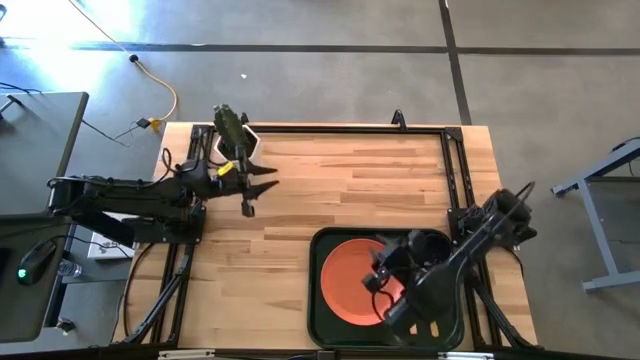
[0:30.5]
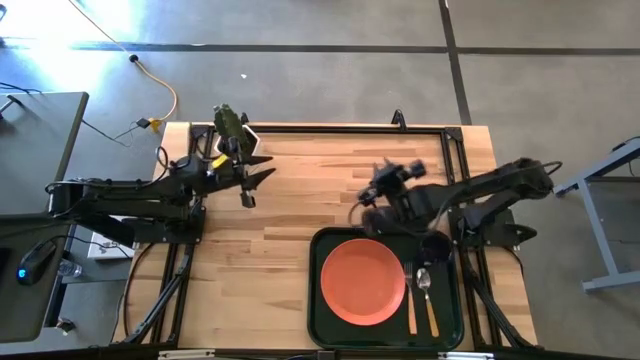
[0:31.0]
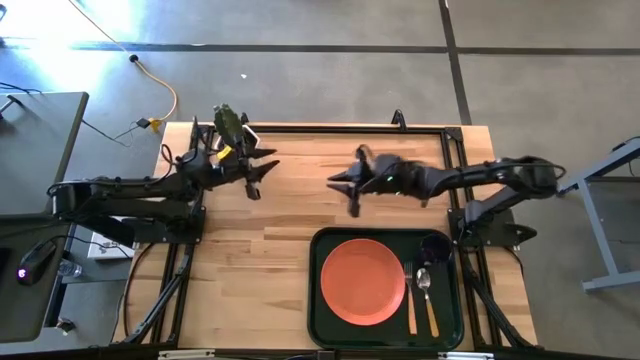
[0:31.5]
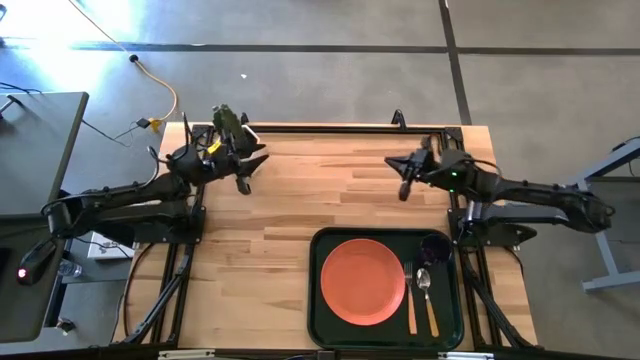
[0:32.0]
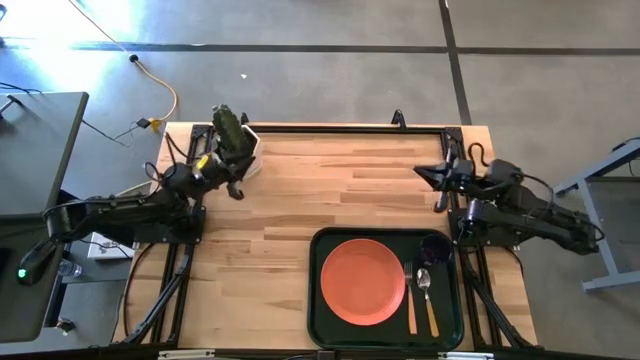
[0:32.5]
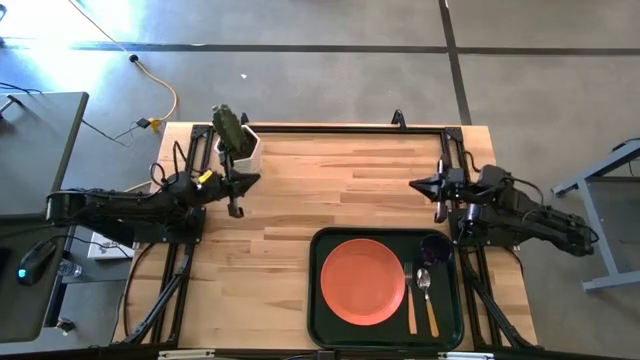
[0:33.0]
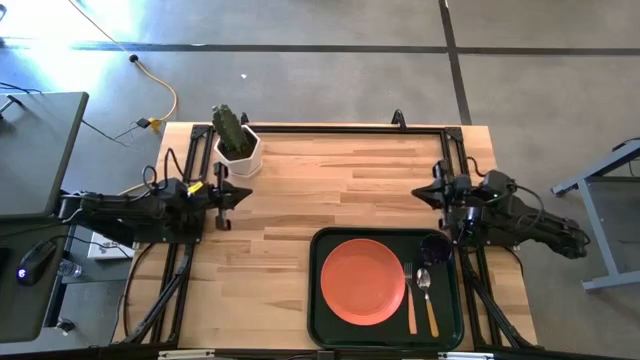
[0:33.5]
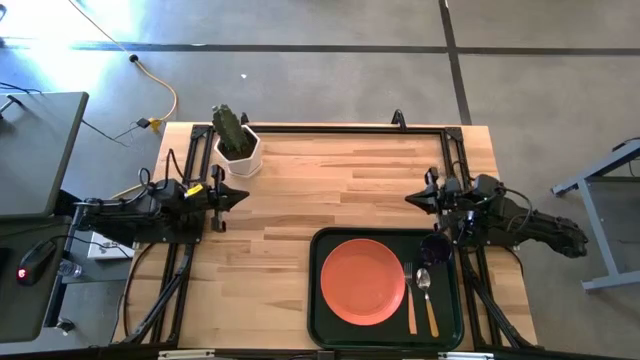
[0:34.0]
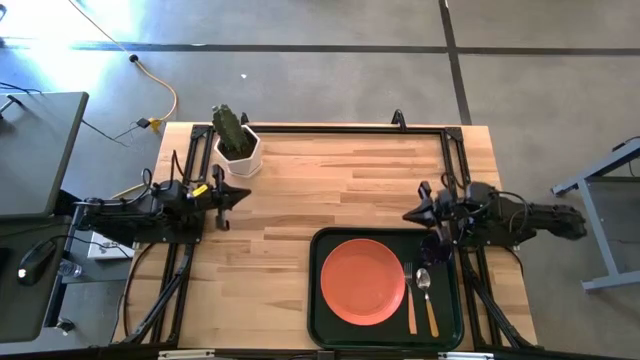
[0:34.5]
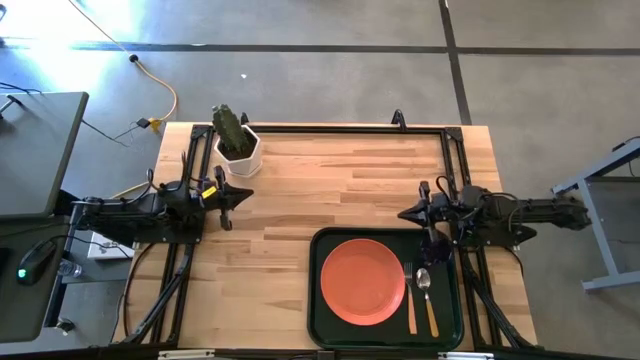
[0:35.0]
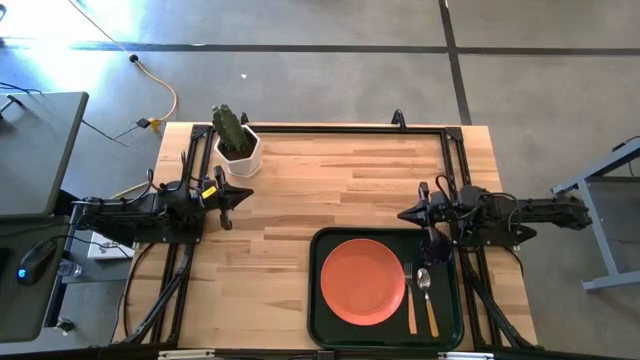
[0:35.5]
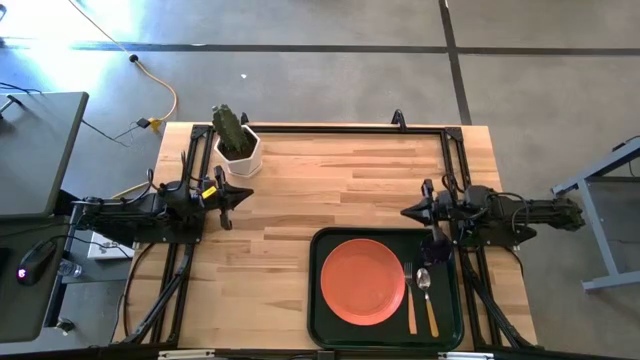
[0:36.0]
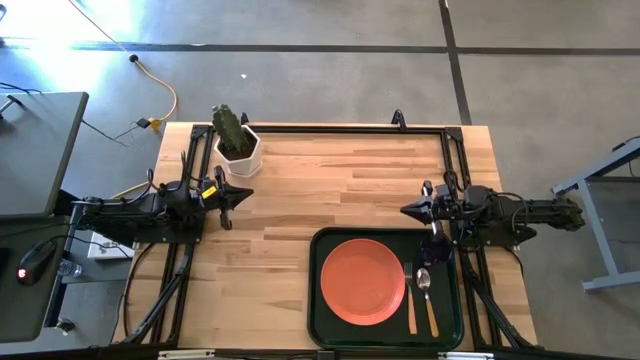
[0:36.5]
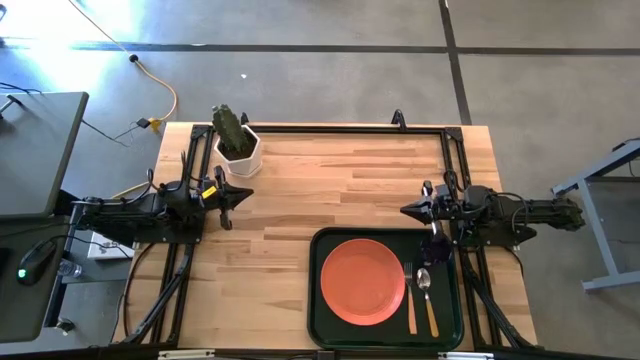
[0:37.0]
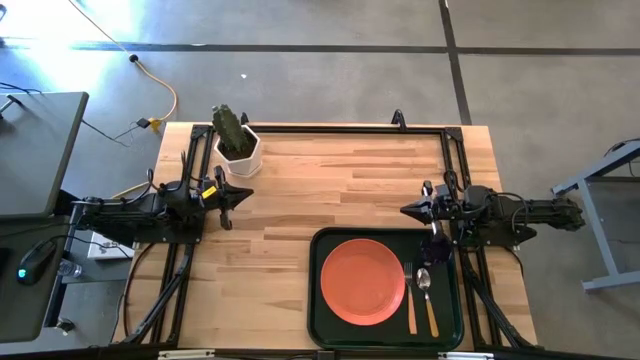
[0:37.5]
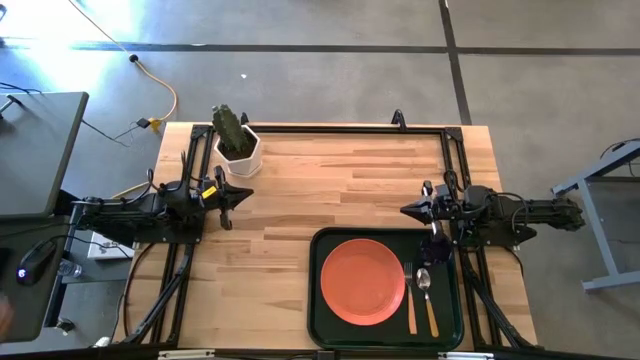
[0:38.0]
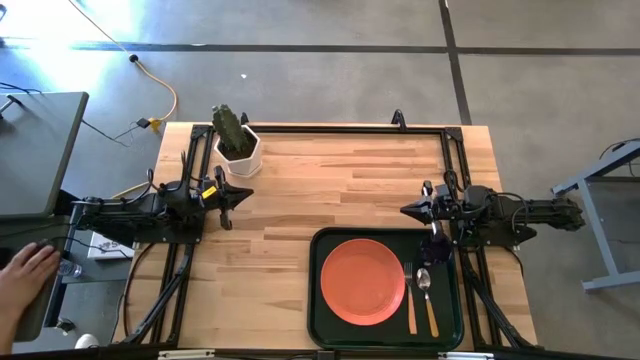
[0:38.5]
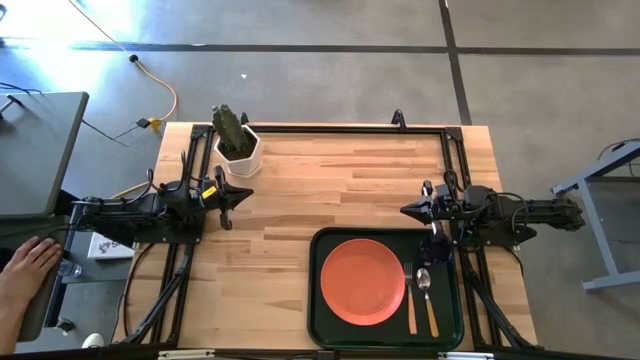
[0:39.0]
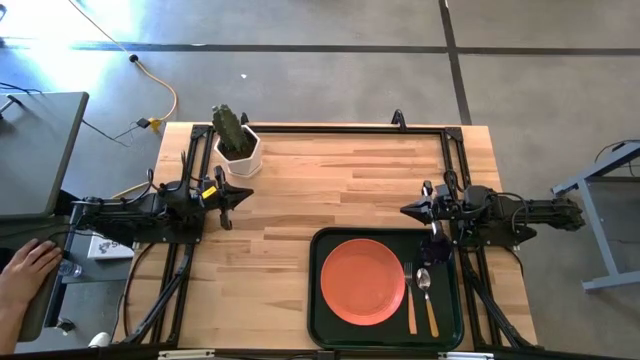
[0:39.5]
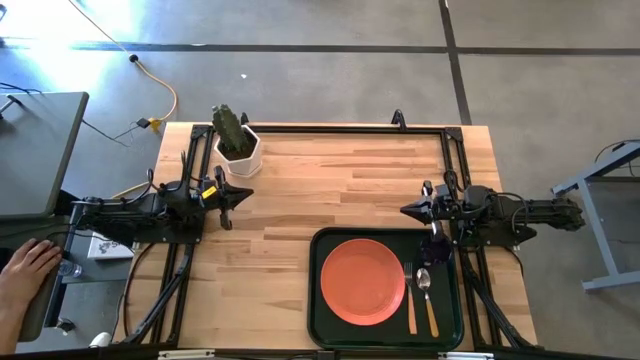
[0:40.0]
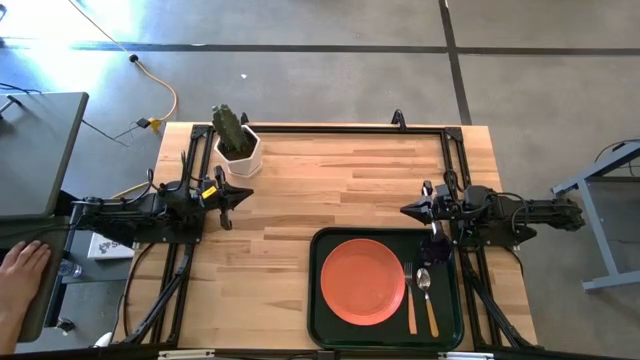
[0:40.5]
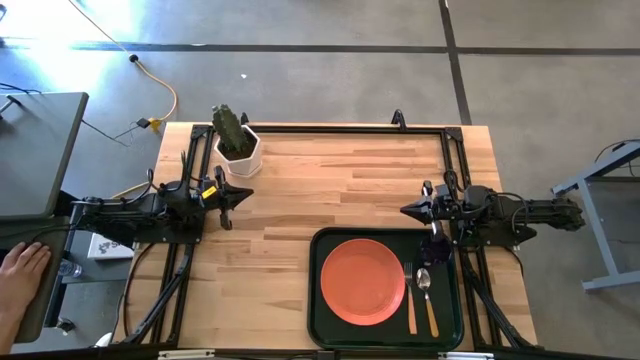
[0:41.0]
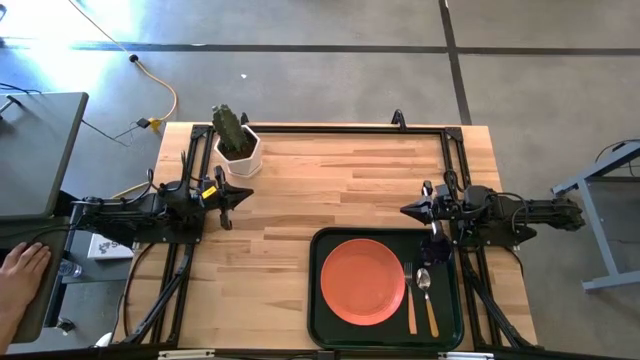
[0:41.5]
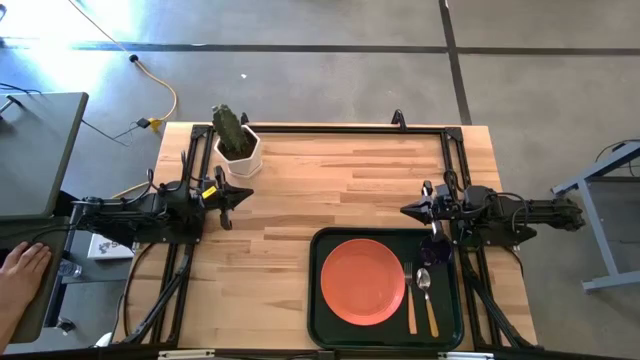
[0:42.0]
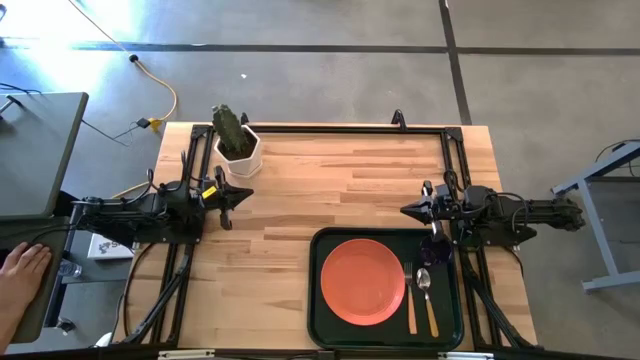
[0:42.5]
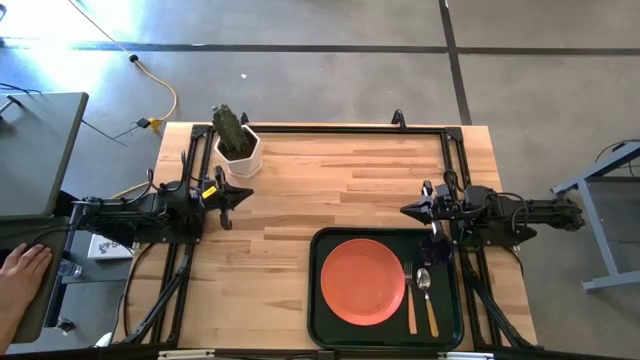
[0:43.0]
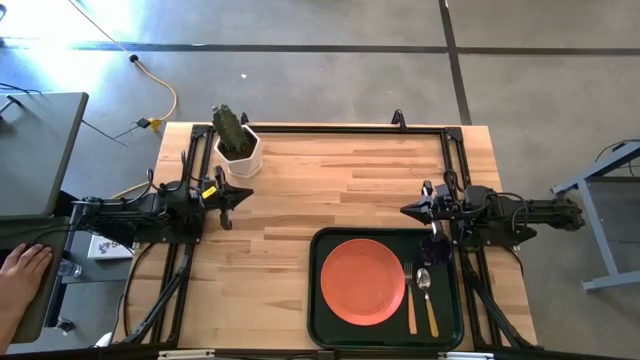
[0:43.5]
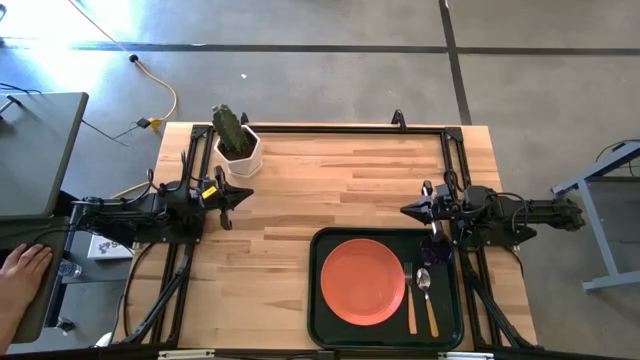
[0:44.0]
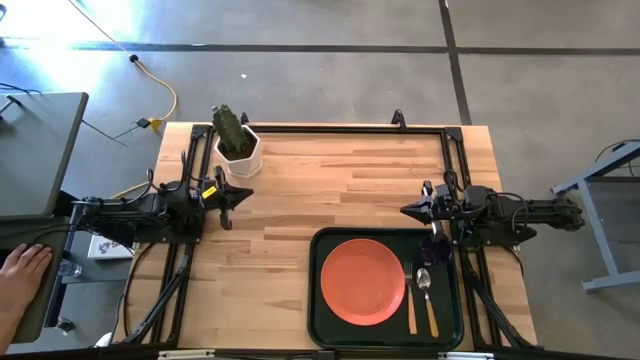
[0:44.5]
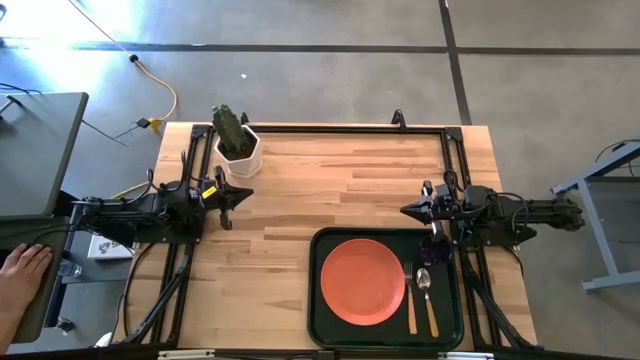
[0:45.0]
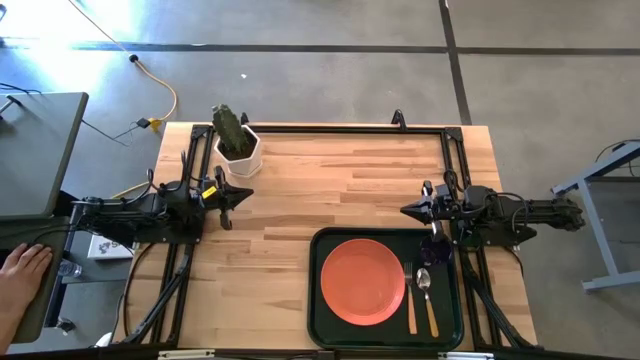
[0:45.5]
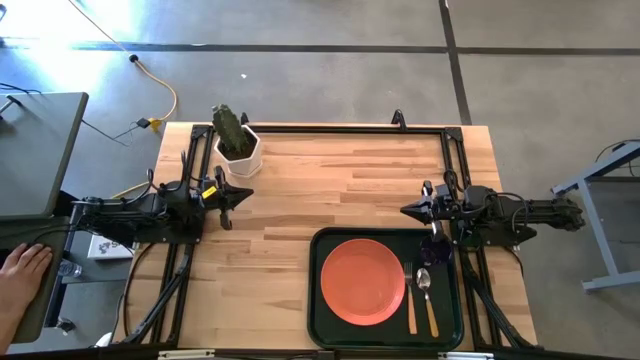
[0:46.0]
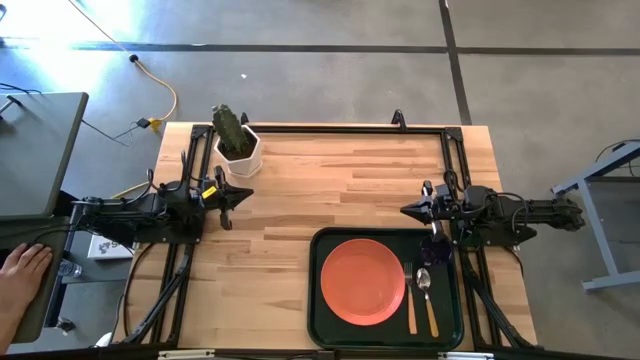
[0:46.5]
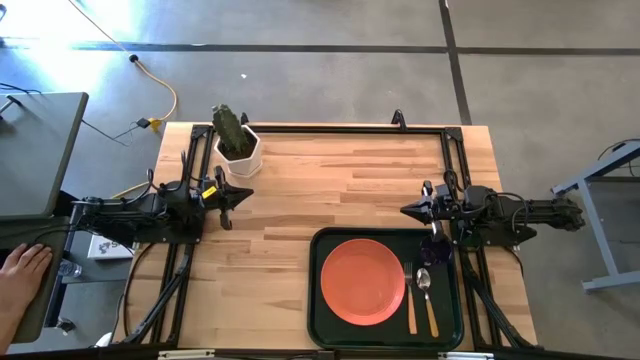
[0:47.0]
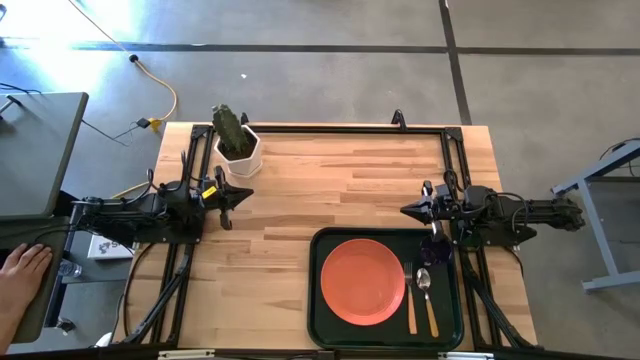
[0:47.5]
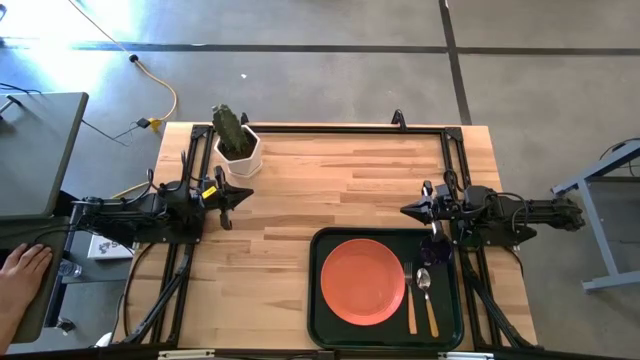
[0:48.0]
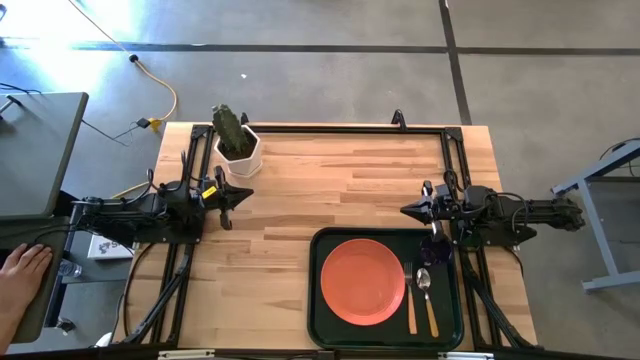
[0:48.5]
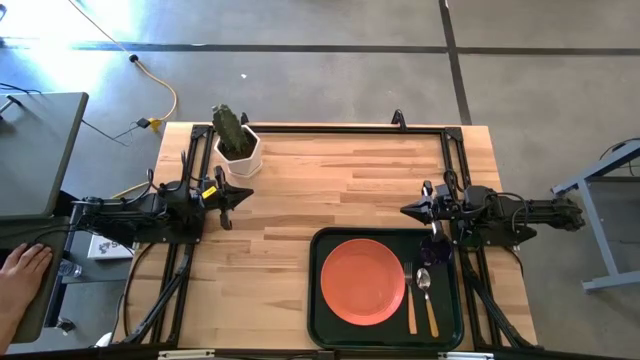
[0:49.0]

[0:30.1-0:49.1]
Task: Pick and place plate/cup/fork/spoon on tray
Return to Home Position

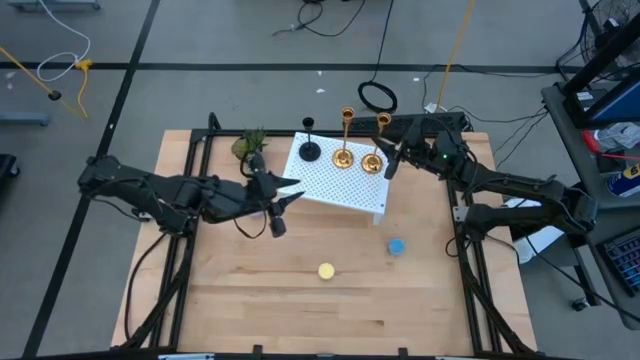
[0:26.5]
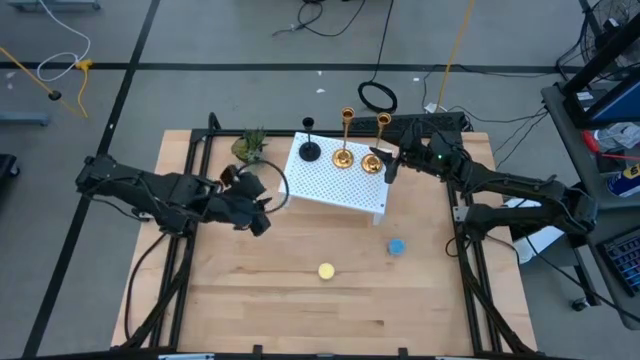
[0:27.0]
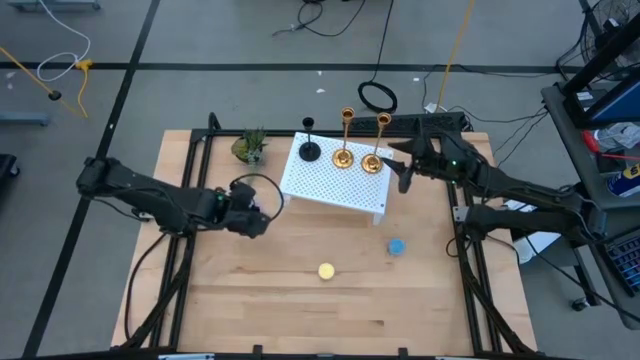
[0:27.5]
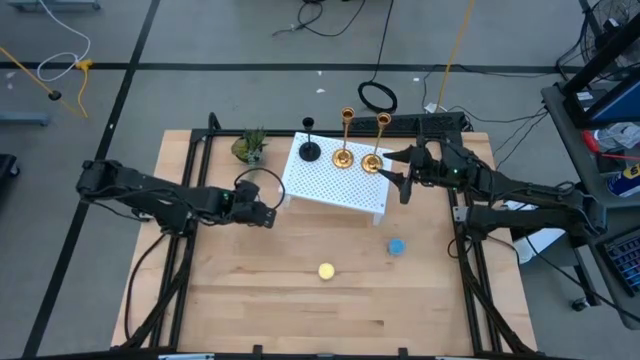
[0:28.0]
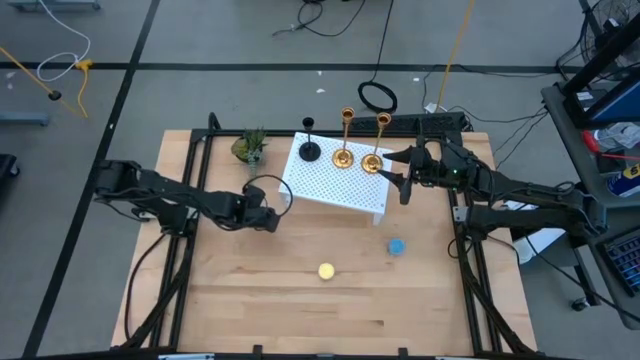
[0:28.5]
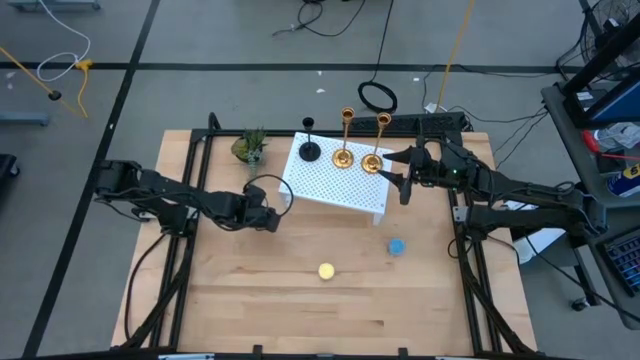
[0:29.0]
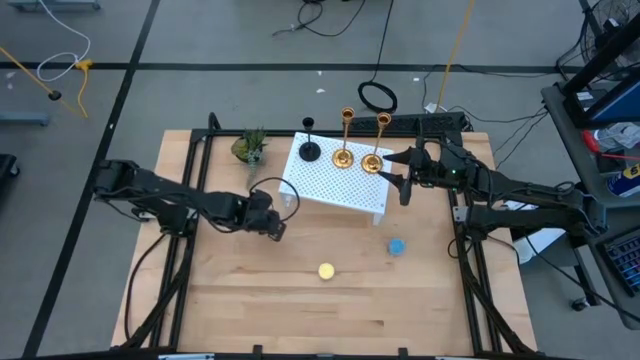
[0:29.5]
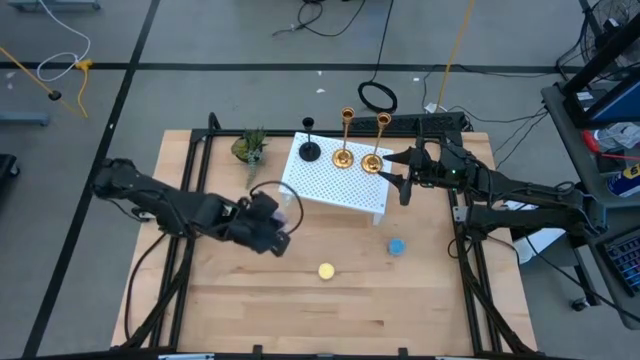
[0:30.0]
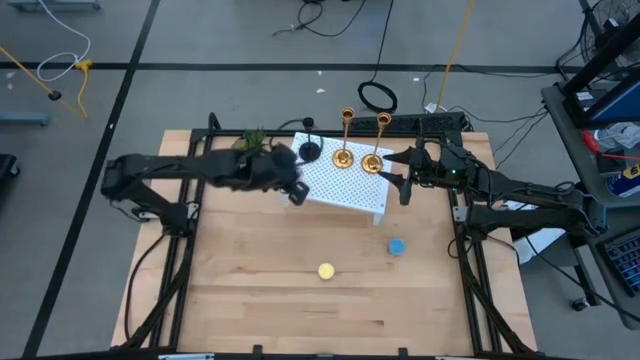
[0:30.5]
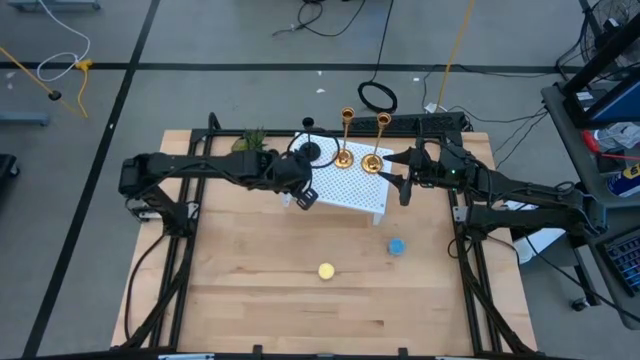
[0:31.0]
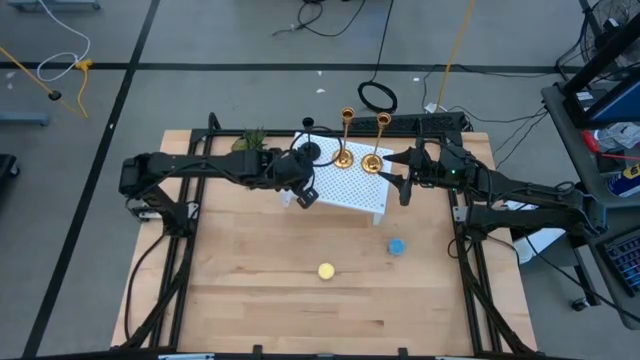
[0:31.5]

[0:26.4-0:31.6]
Task: Pick & Place candle stick holders
Put the purple scented candle on the shelf
